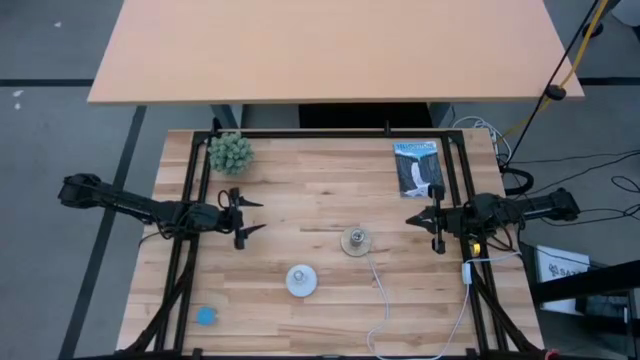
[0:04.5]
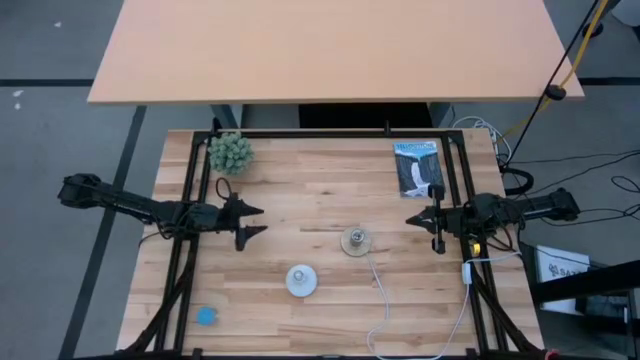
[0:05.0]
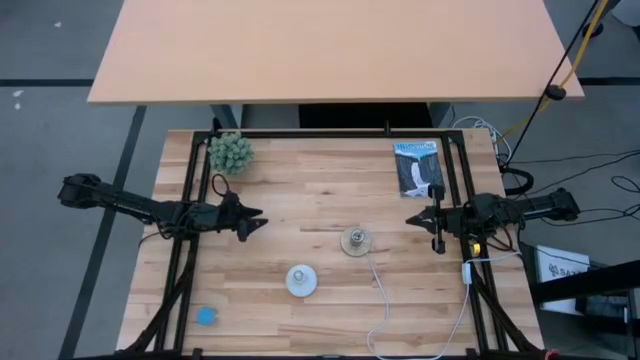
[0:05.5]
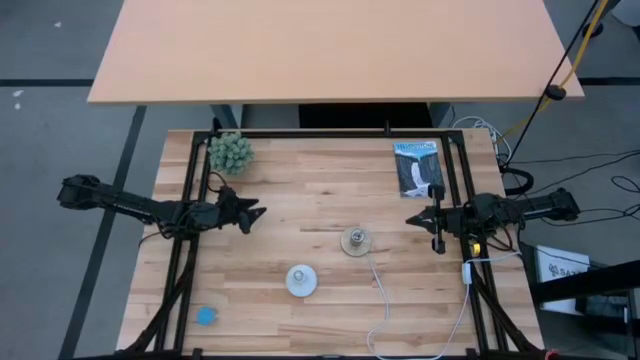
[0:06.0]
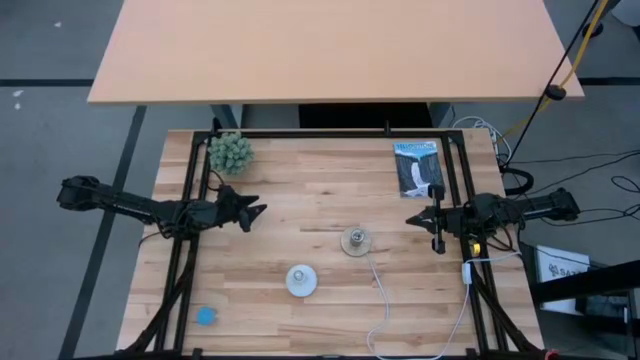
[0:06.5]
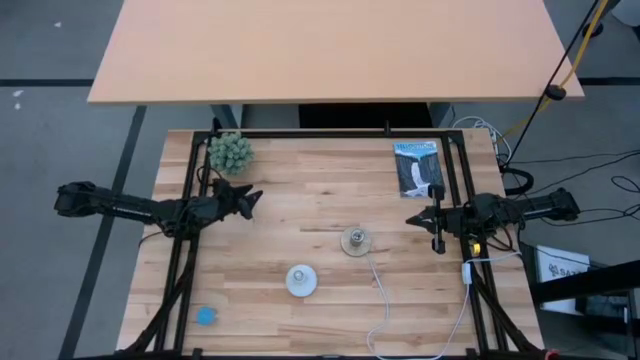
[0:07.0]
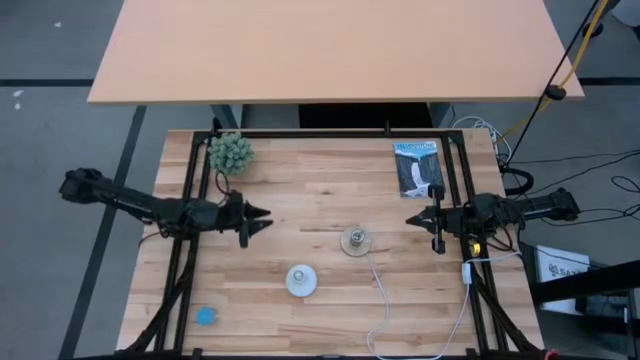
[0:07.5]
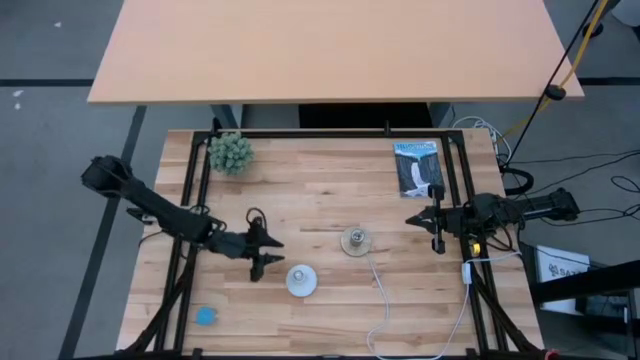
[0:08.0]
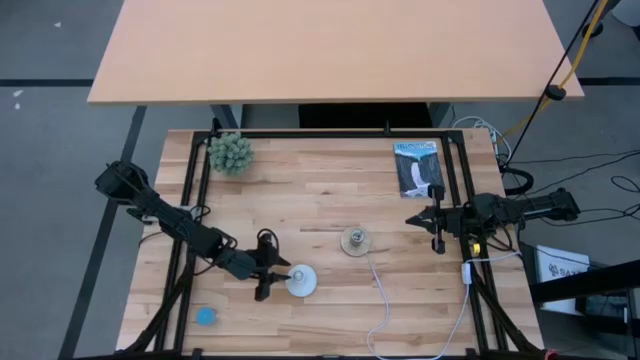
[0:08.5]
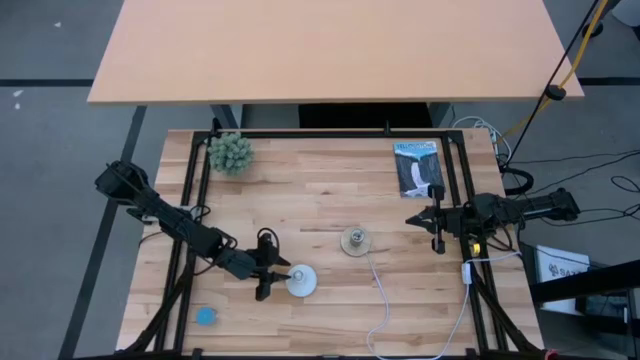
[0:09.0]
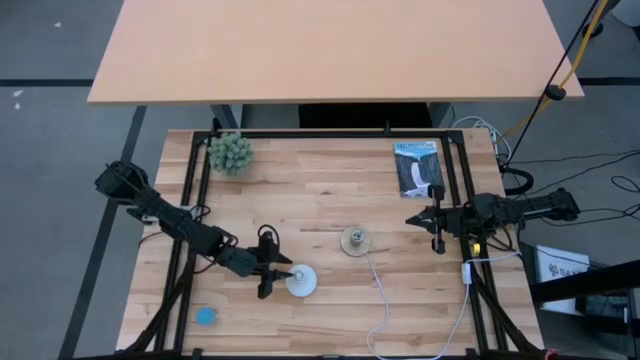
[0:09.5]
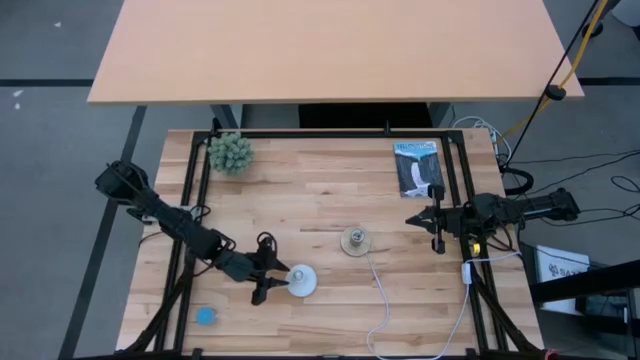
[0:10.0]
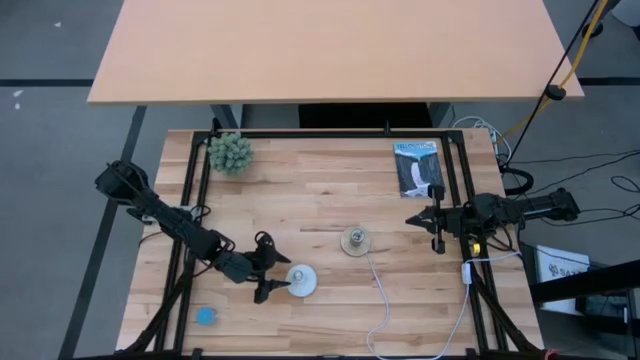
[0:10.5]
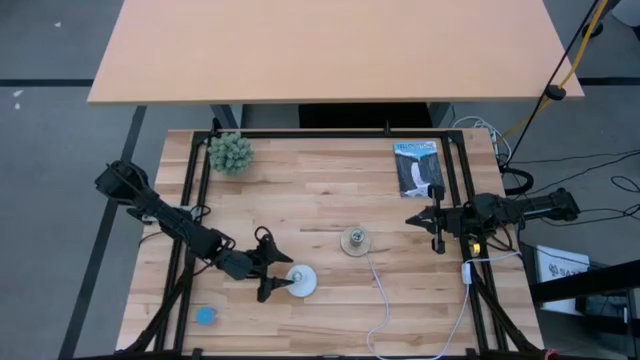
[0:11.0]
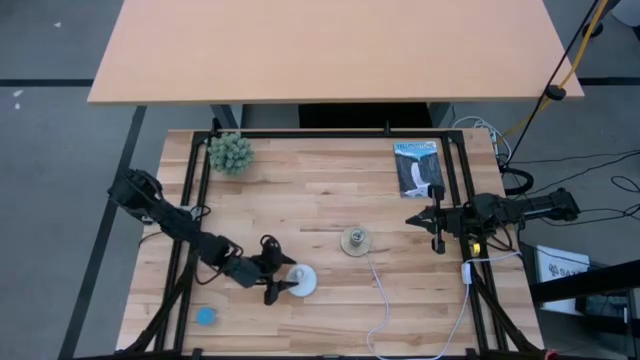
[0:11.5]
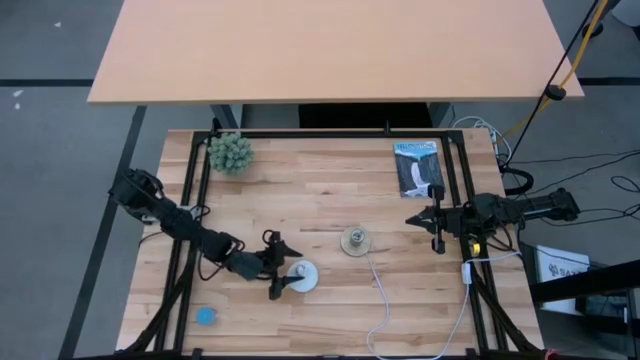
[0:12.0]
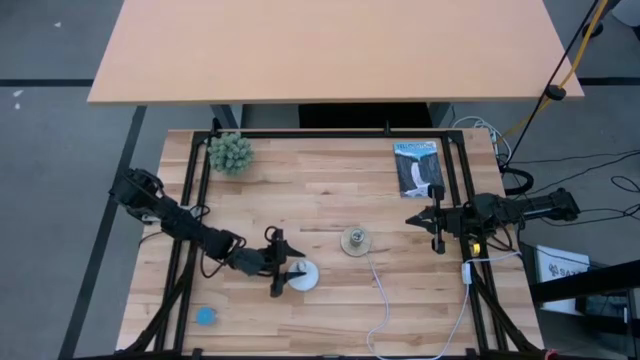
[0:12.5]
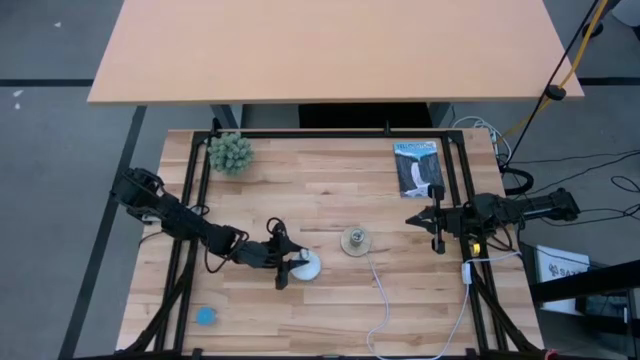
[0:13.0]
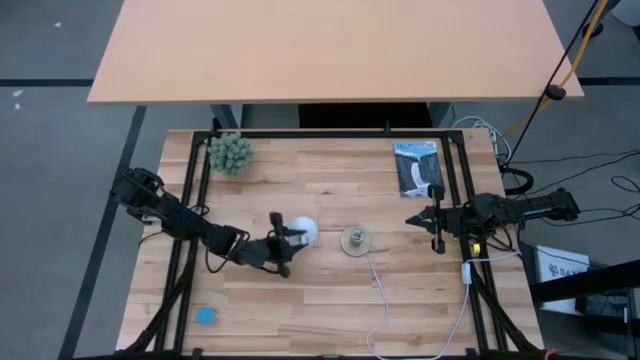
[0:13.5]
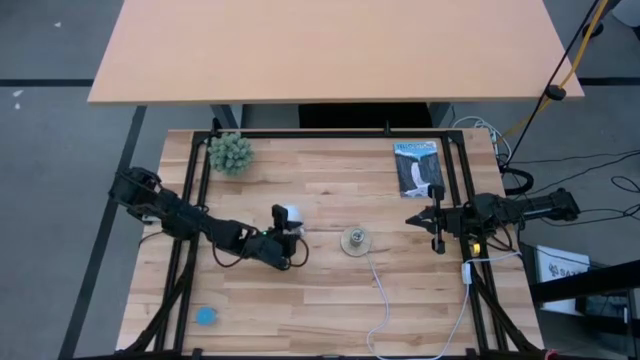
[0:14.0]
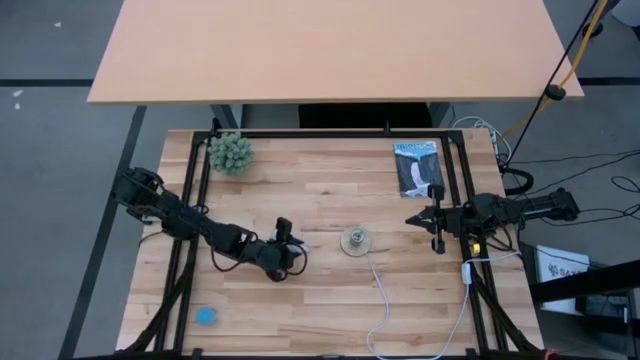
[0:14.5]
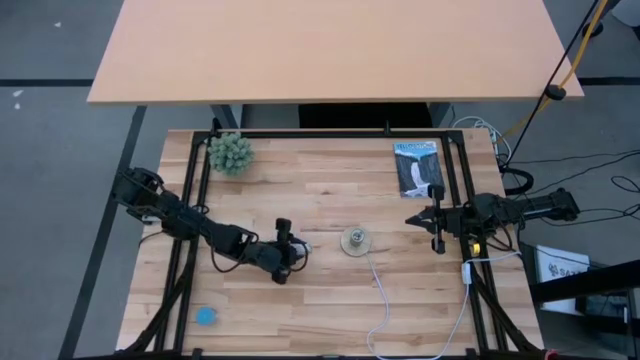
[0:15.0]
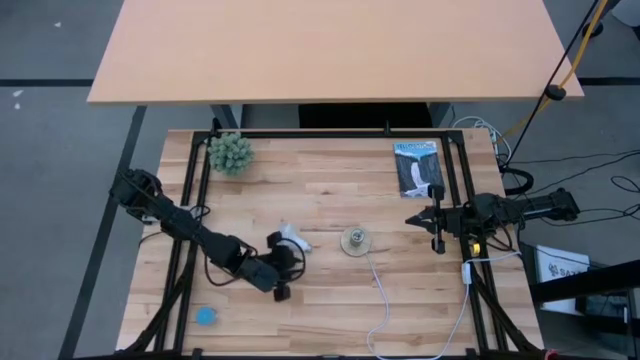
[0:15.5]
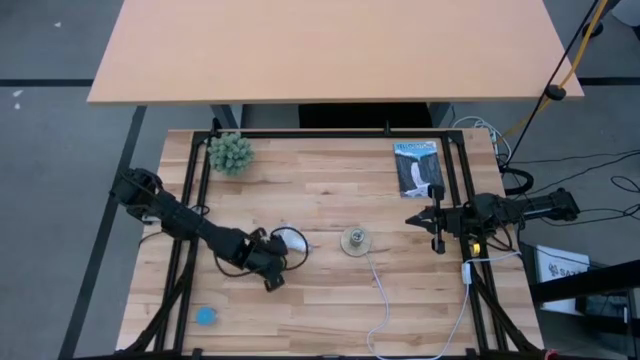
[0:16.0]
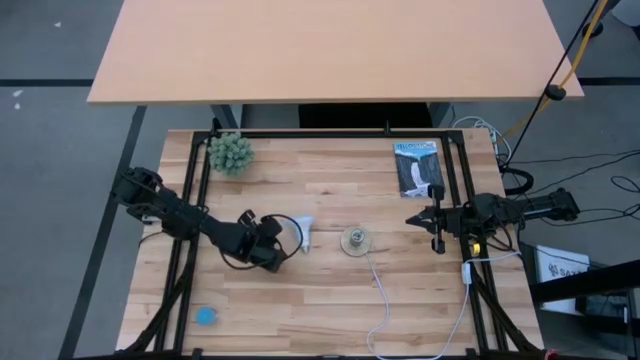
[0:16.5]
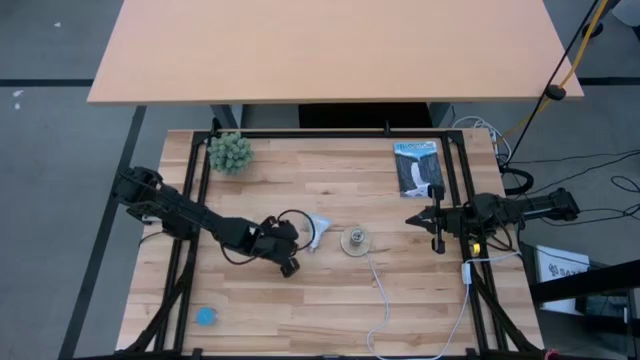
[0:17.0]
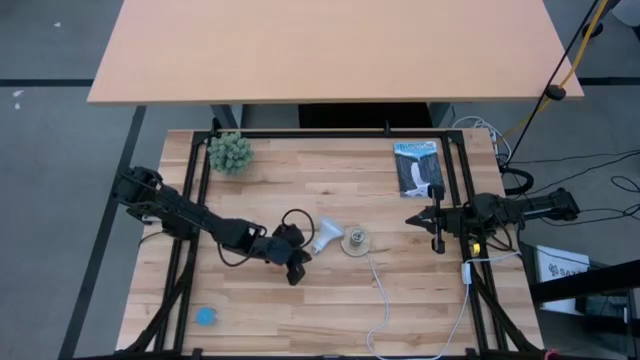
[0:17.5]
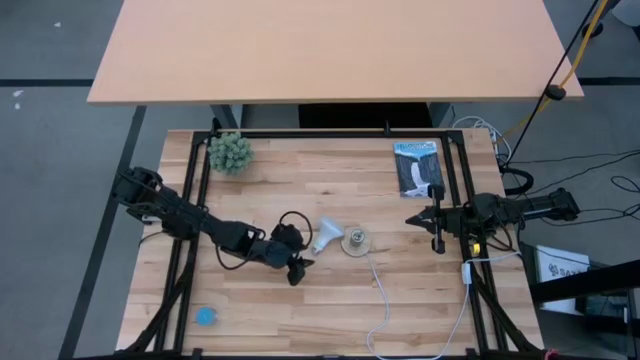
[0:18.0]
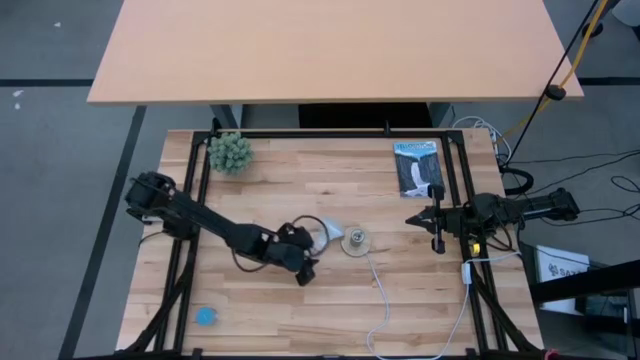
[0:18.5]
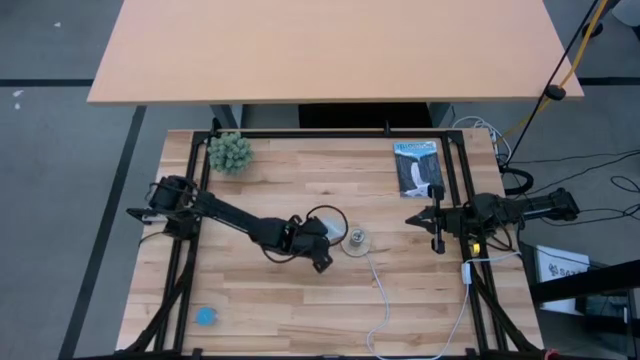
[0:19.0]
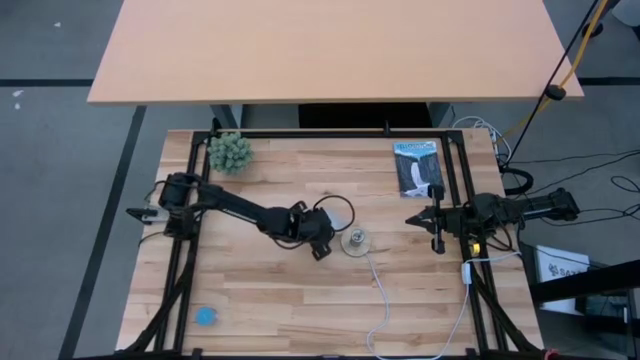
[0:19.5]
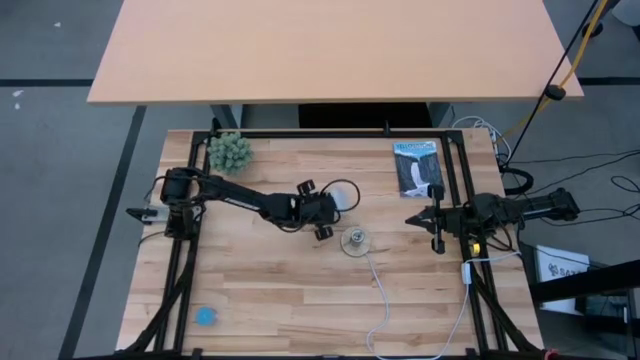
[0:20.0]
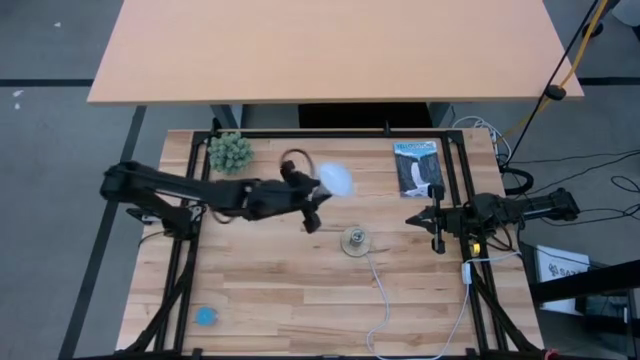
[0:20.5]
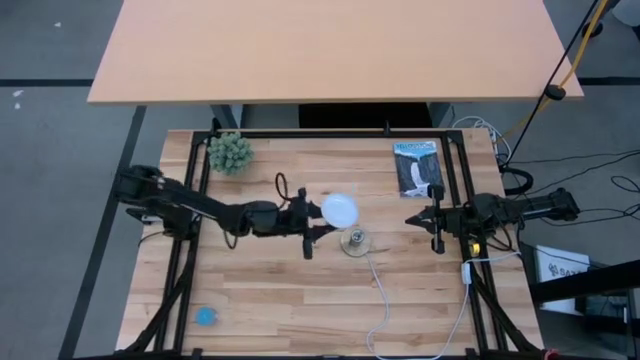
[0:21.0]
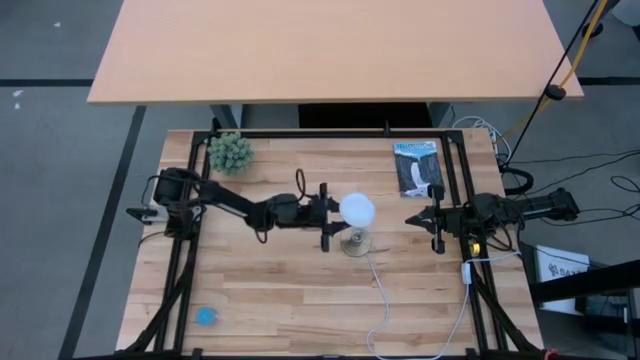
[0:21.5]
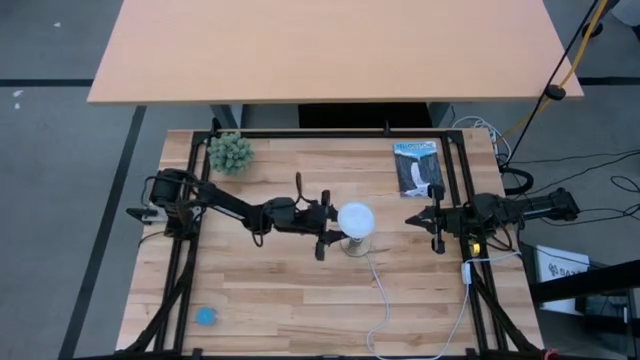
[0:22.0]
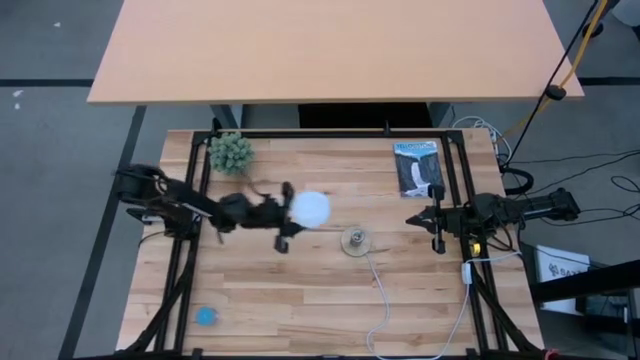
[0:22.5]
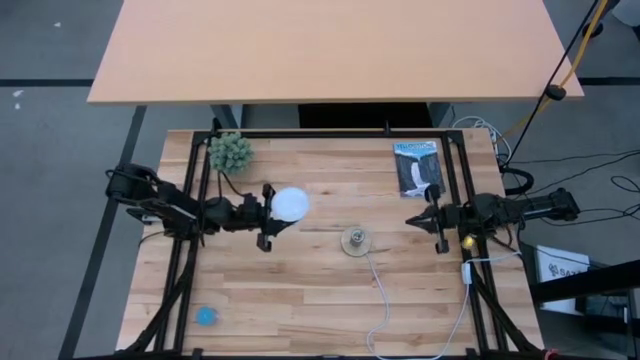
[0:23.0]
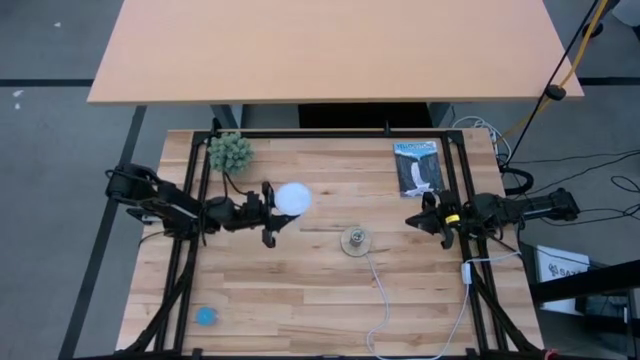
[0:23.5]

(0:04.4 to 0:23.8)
Task: Screw lightbulb
Insert the white lightbulb into the desk lamp
